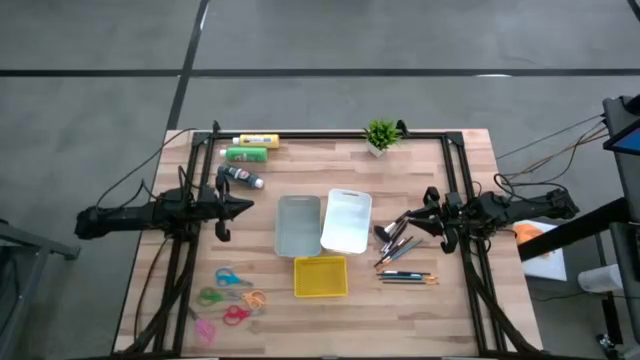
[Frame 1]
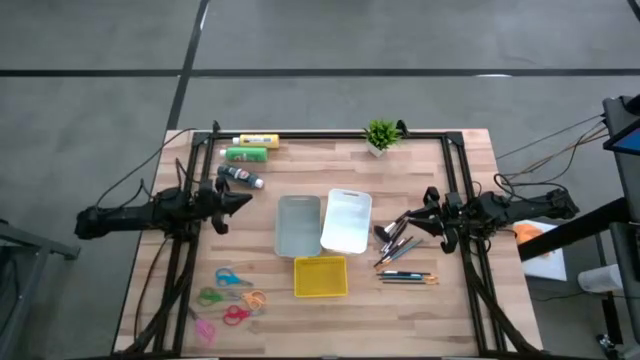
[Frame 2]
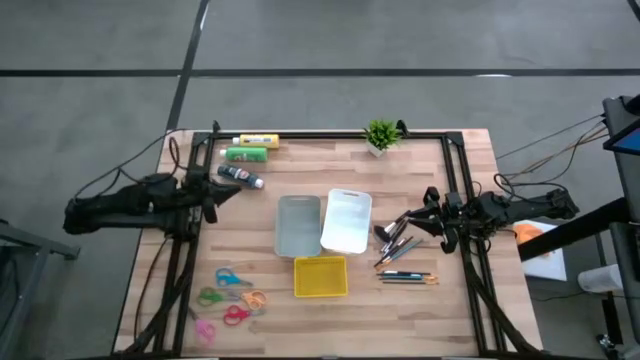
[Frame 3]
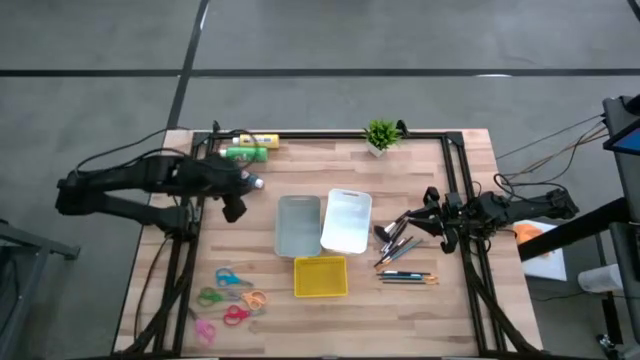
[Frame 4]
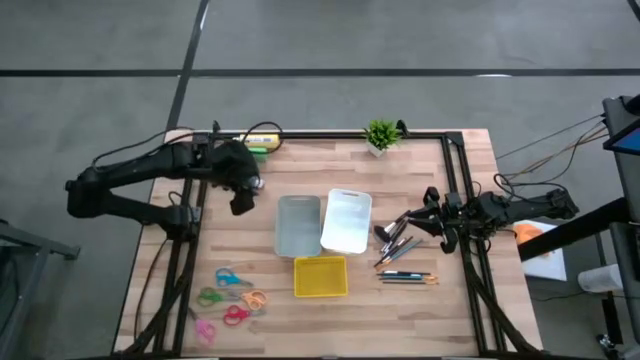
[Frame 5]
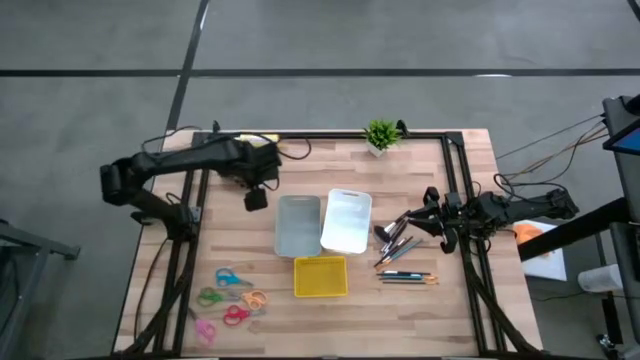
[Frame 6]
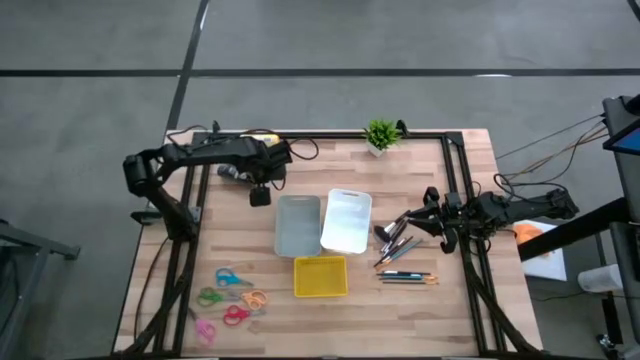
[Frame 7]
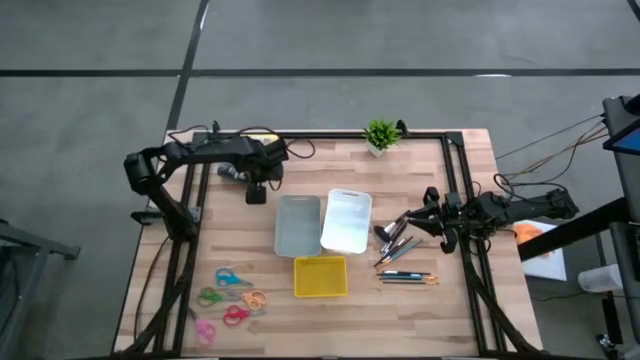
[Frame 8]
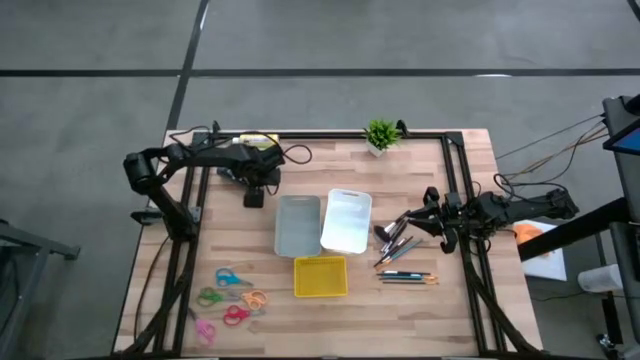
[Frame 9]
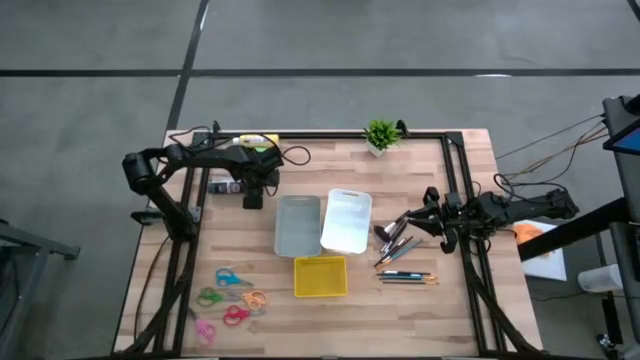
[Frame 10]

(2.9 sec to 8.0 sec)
Task: Pick & Place Paint Supplies
Put the black paint bottle into the gray bin

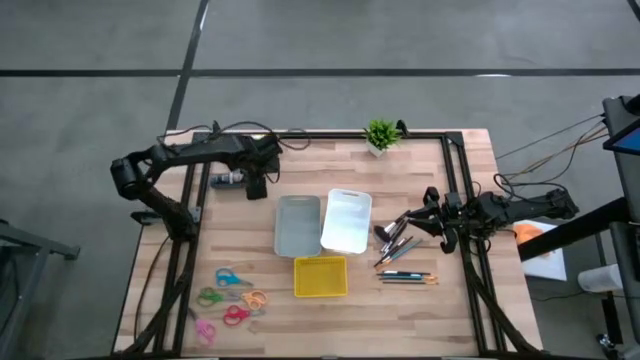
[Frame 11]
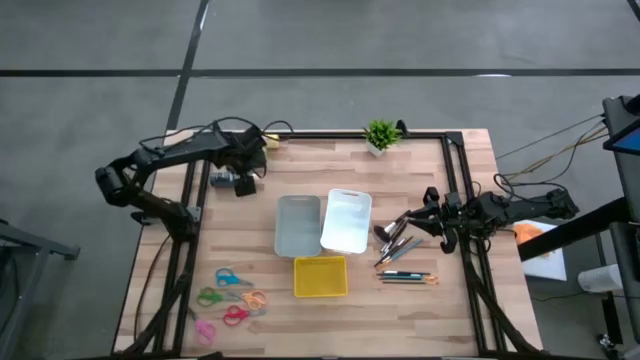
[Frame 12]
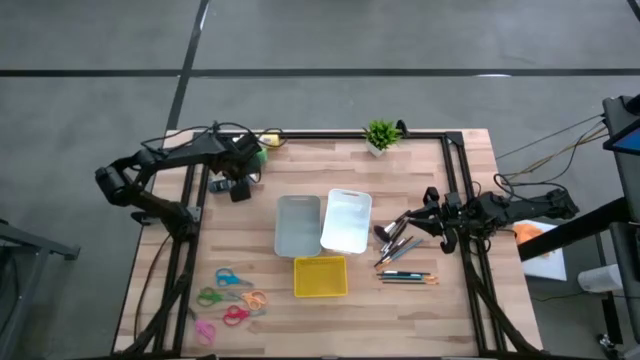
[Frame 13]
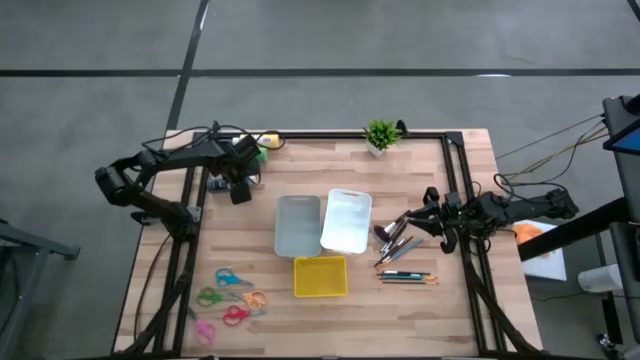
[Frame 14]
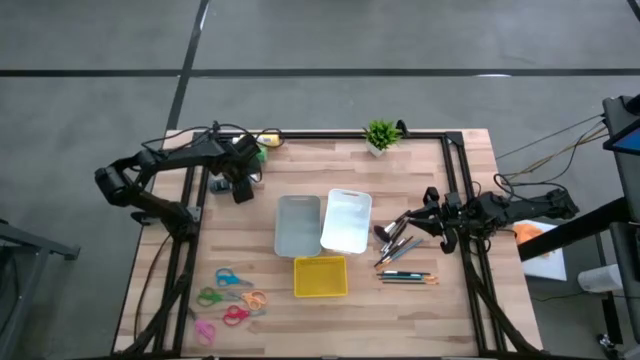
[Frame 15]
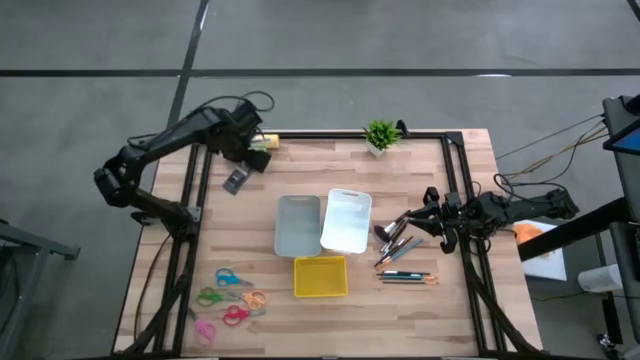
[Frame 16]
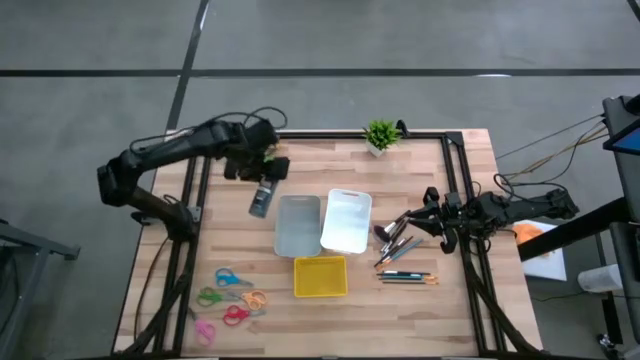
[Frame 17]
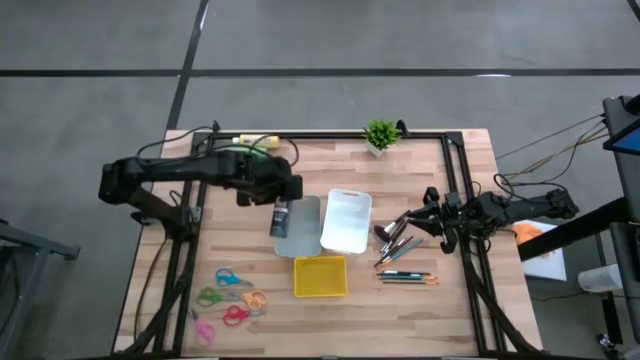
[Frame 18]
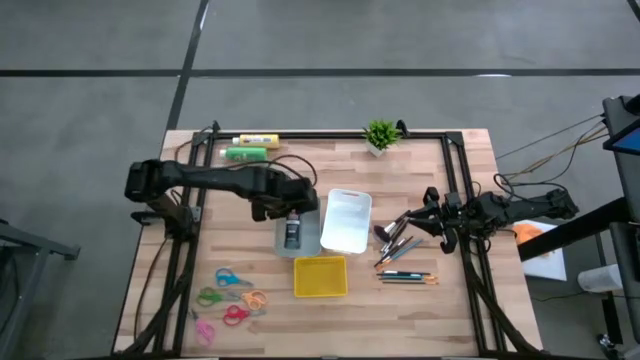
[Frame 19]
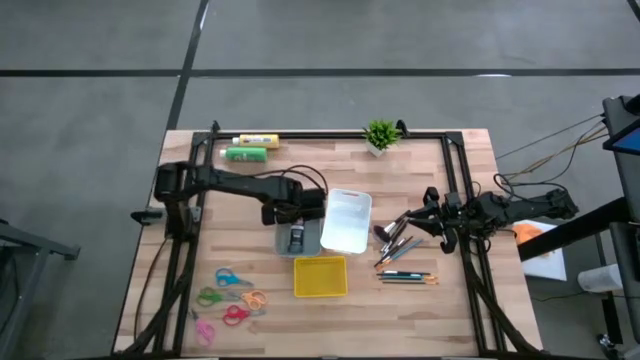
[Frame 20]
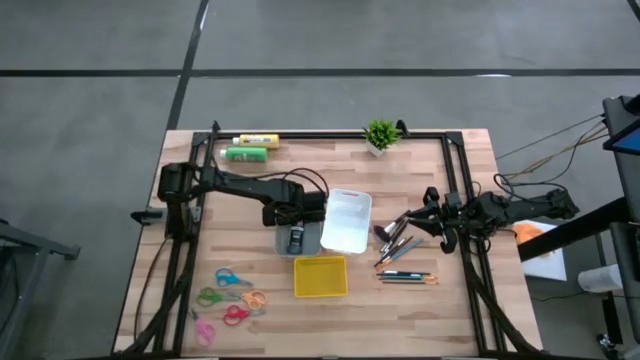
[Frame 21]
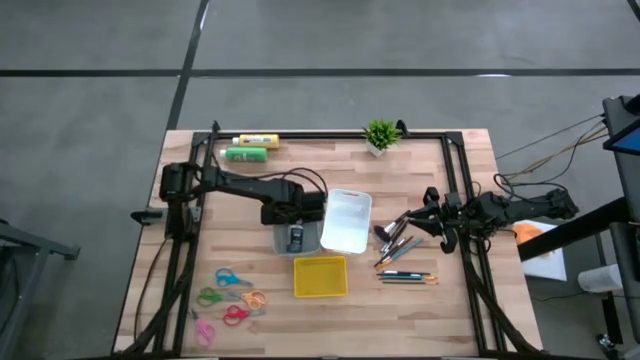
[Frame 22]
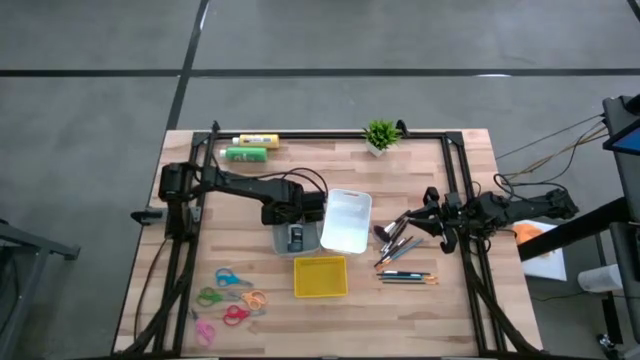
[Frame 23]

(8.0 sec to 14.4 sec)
Put the black paint bottle into the gray bin

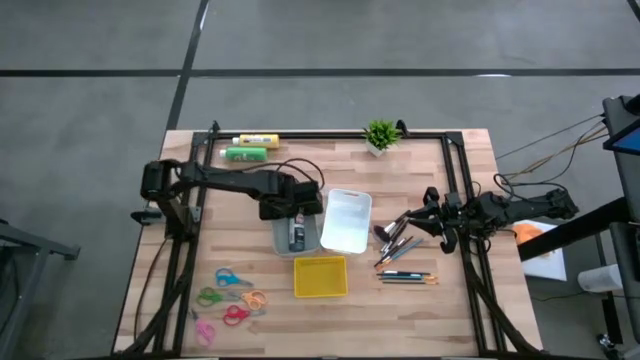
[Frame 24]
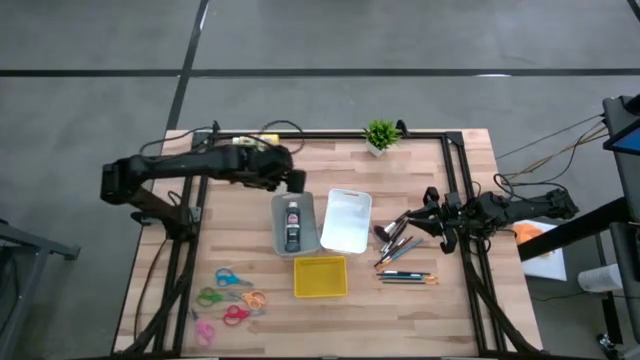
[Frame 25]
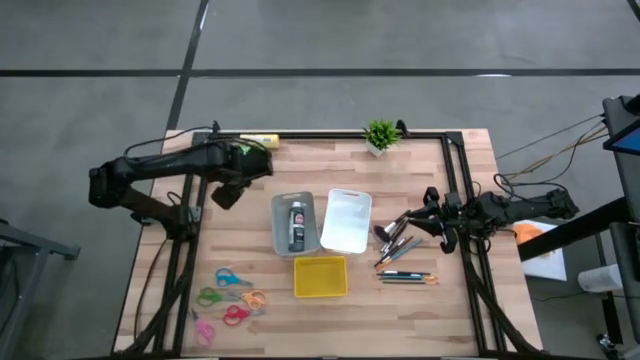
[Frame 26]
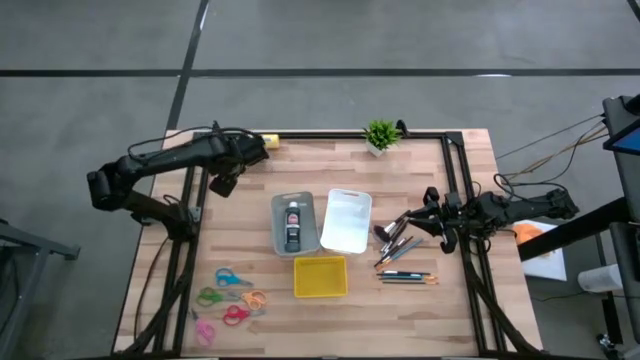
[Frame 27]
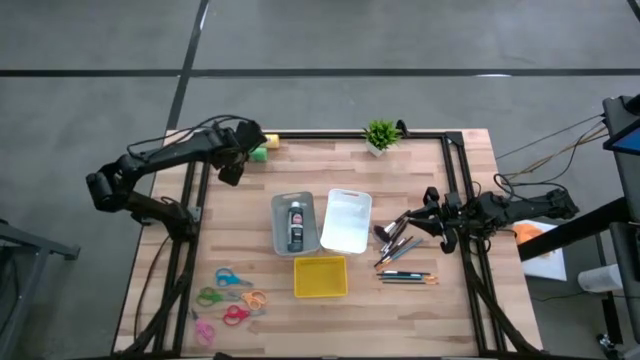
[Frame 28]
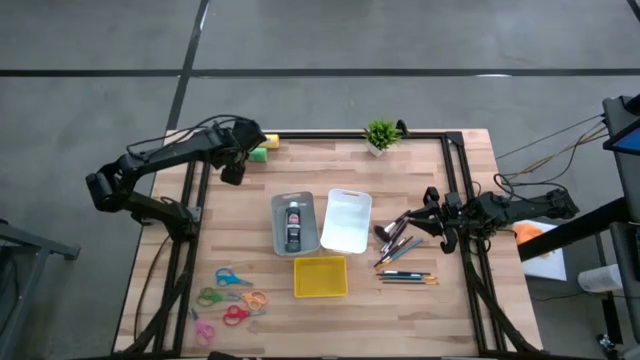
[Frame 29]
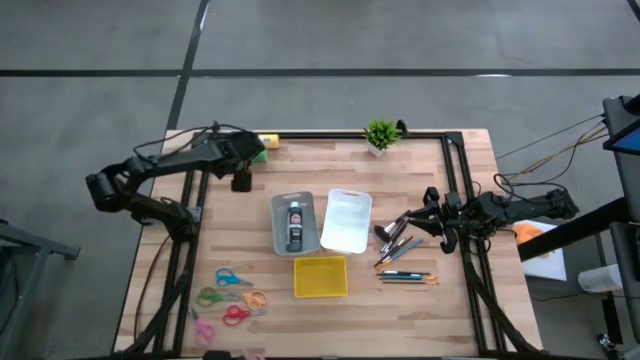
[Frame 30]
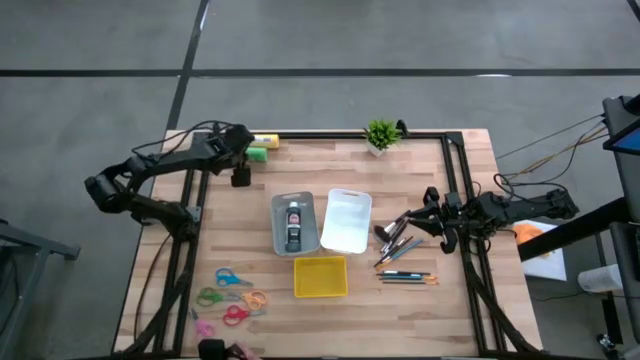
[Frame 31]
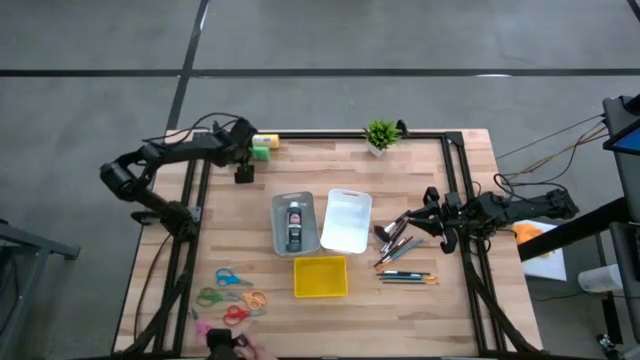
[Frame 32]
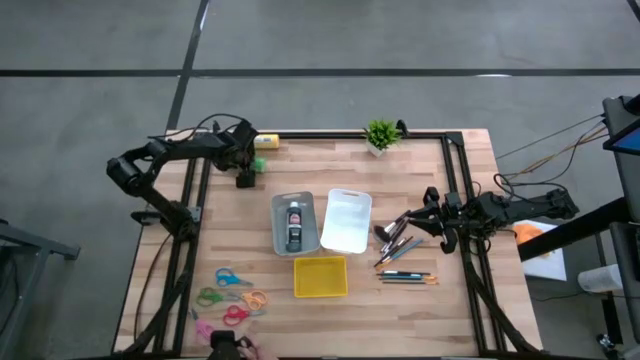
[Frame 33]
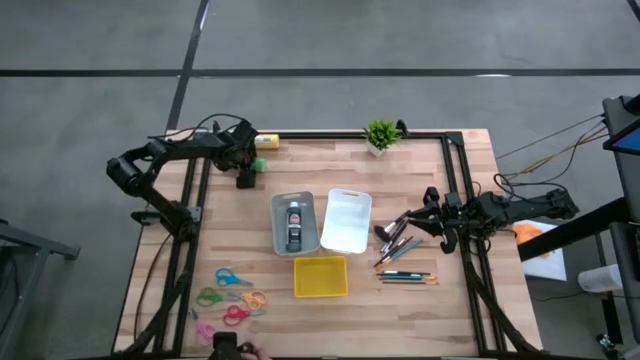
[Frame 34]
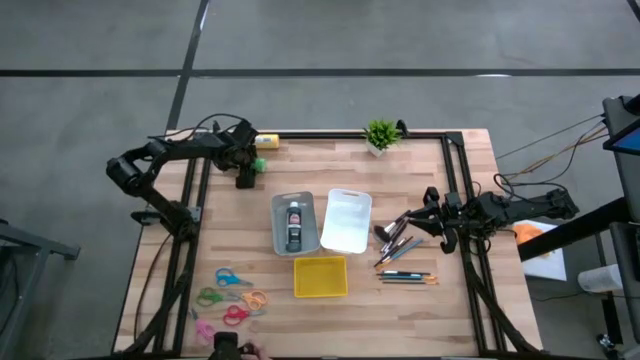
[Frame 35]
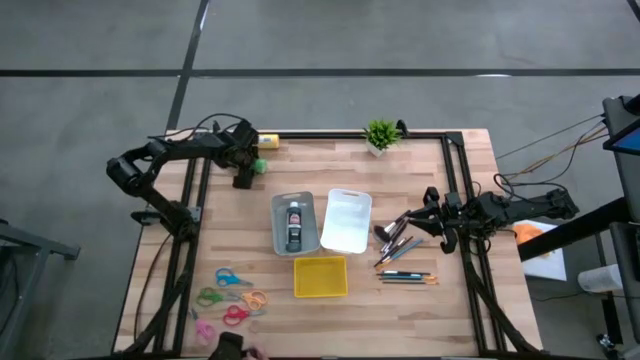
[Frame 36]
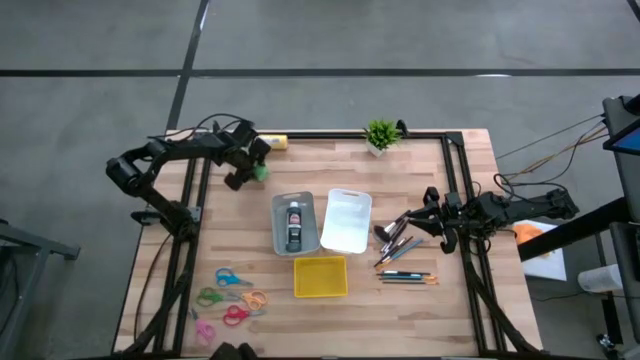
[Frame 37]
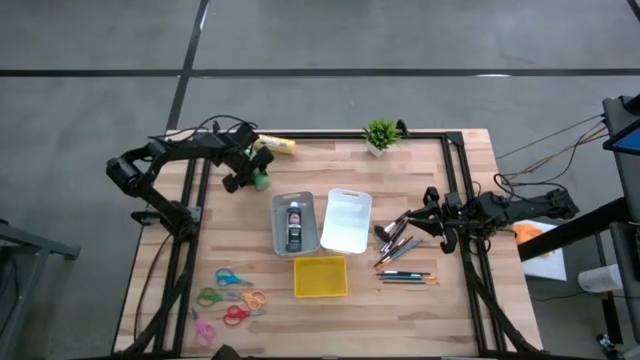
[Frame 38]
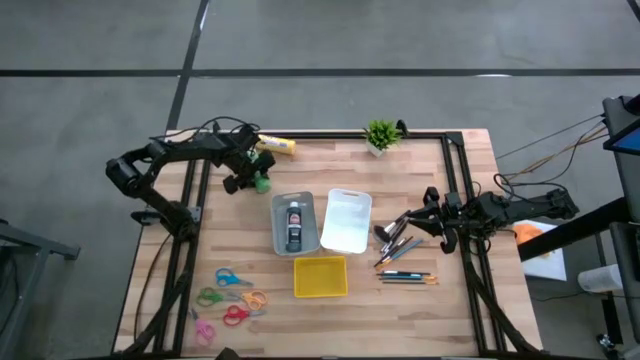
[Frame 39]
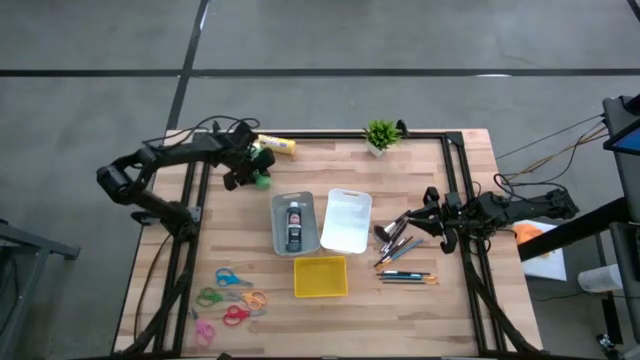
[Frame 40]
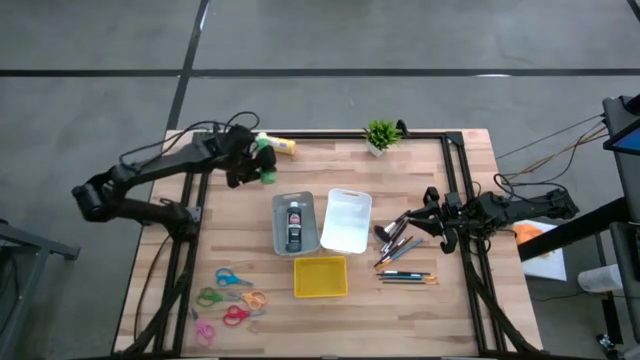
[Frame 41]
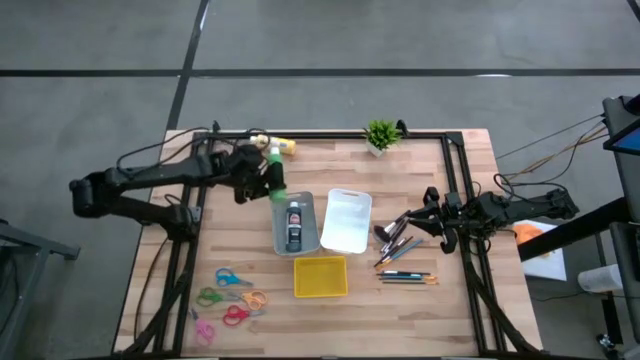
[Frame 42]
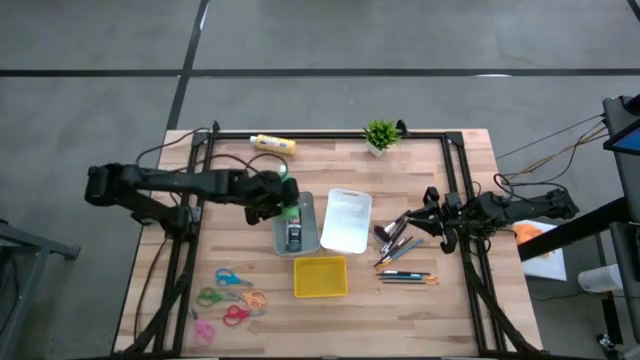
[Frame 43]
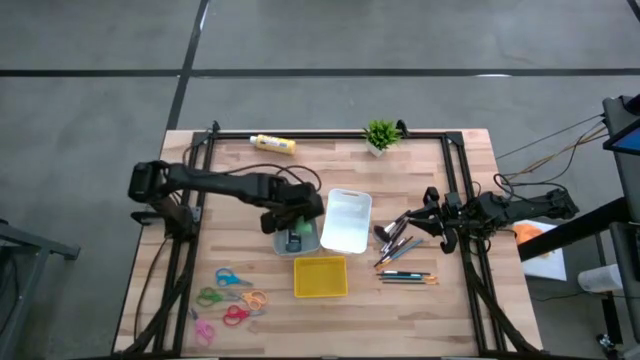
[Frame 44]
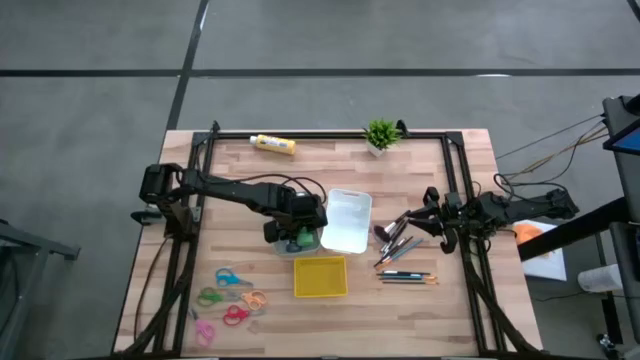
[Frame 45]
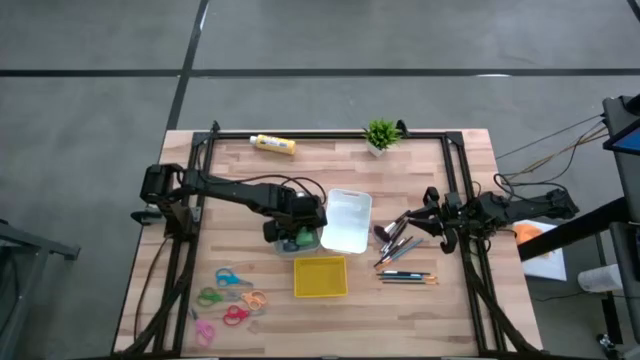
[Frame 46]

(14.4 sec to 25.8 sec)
Put the green paint bottle into the gray bin
